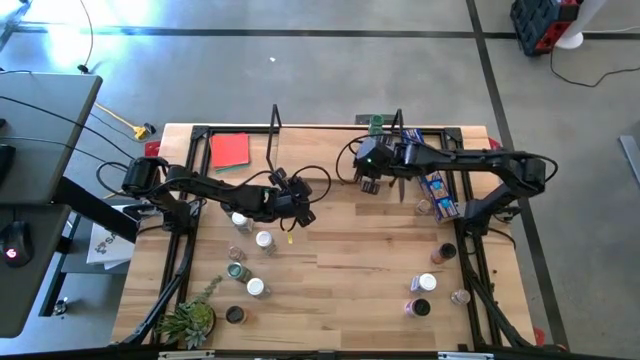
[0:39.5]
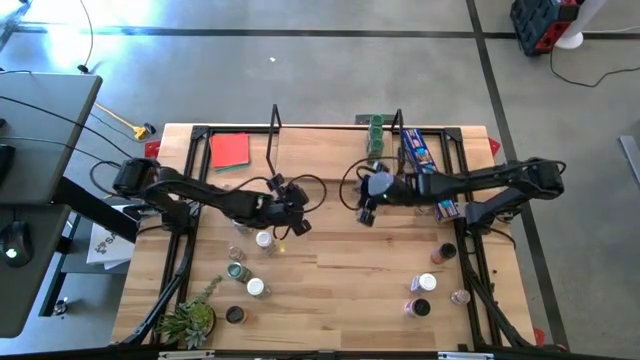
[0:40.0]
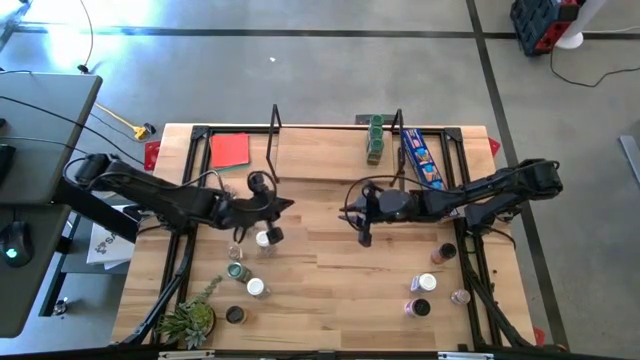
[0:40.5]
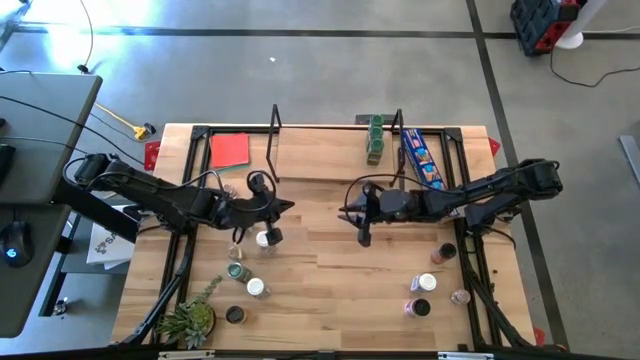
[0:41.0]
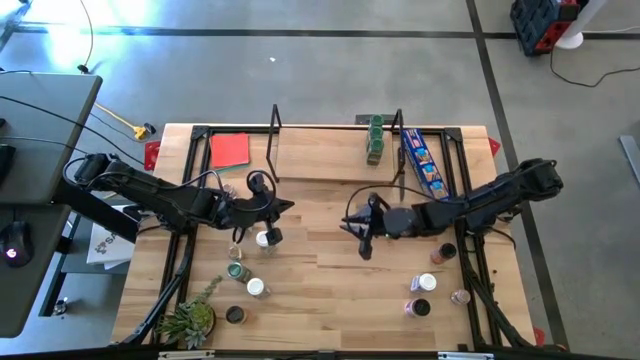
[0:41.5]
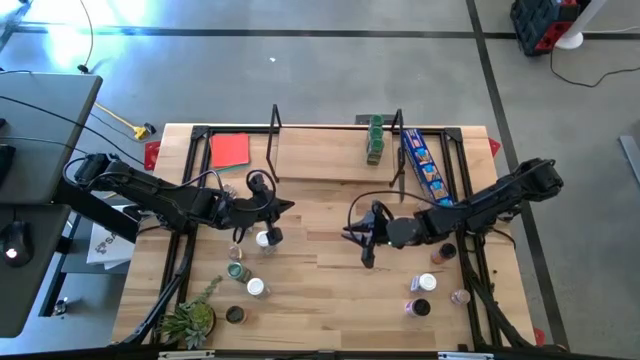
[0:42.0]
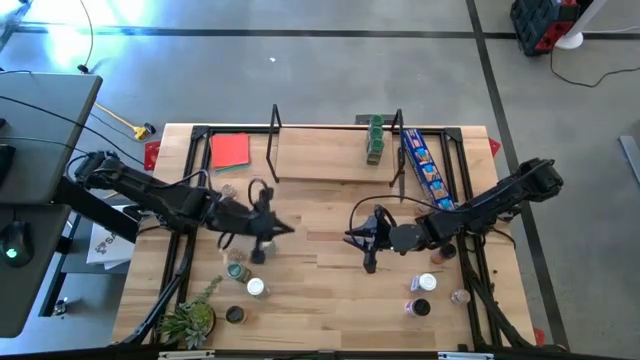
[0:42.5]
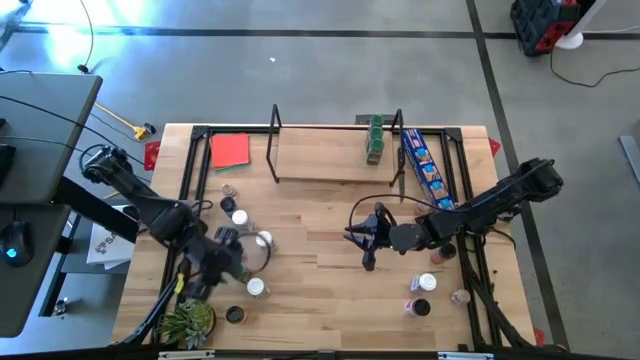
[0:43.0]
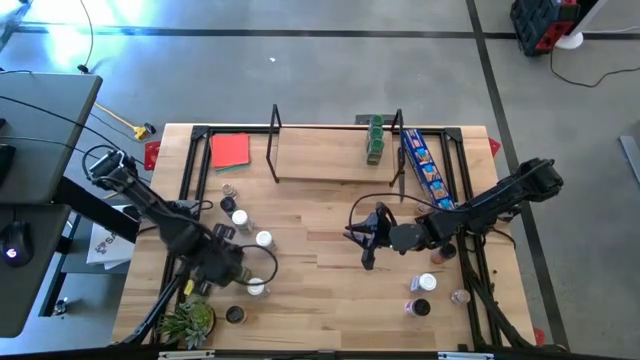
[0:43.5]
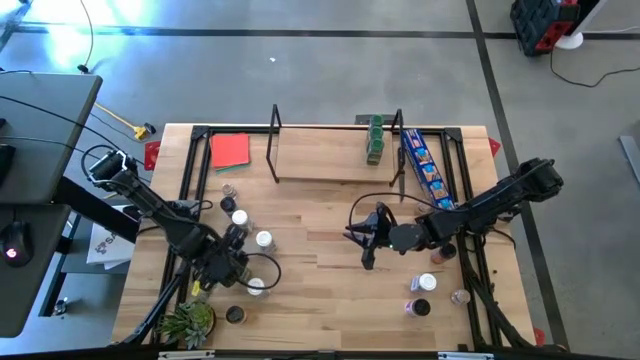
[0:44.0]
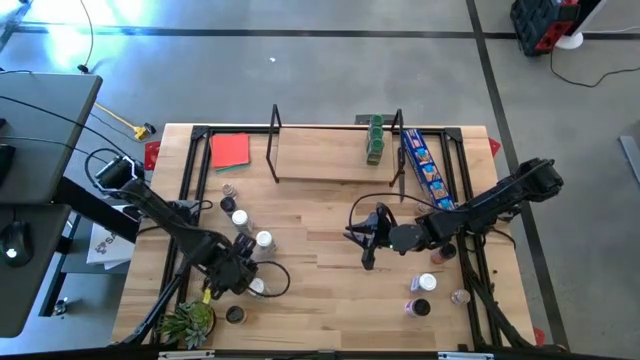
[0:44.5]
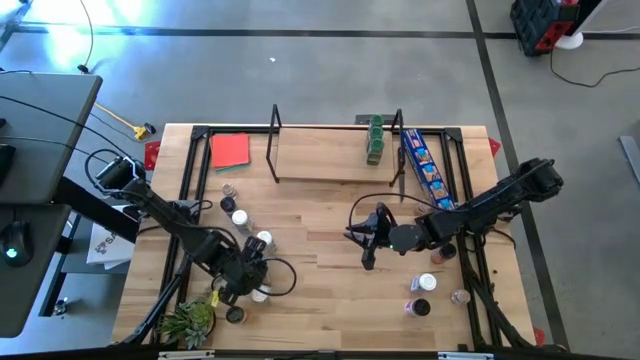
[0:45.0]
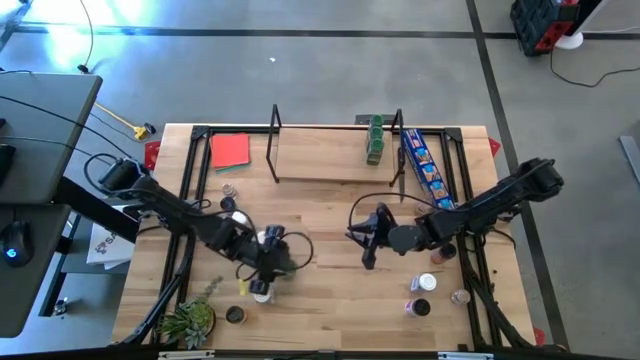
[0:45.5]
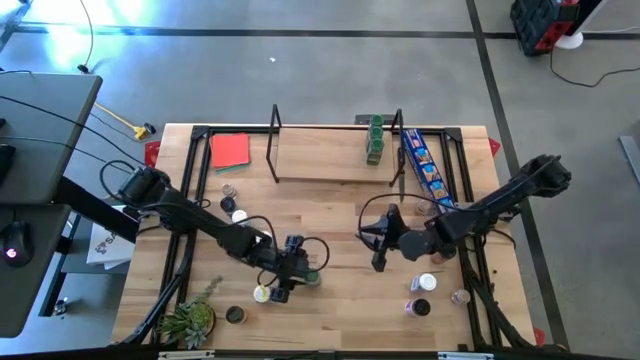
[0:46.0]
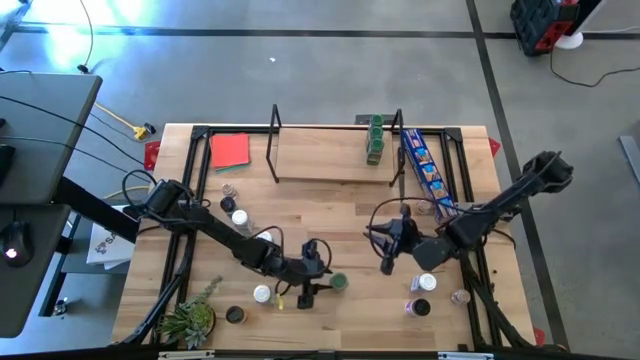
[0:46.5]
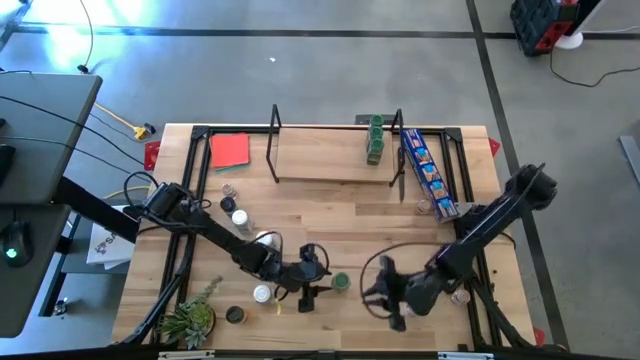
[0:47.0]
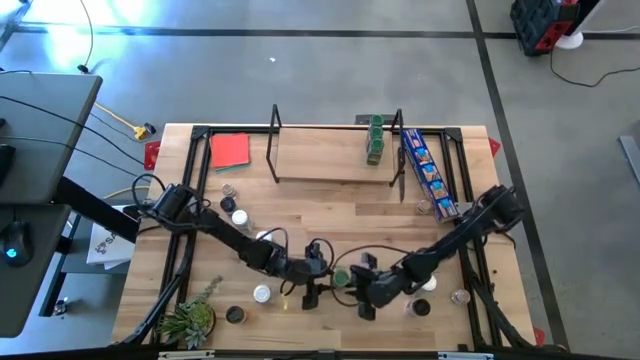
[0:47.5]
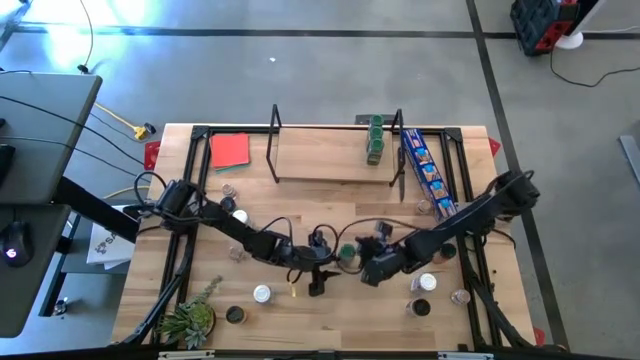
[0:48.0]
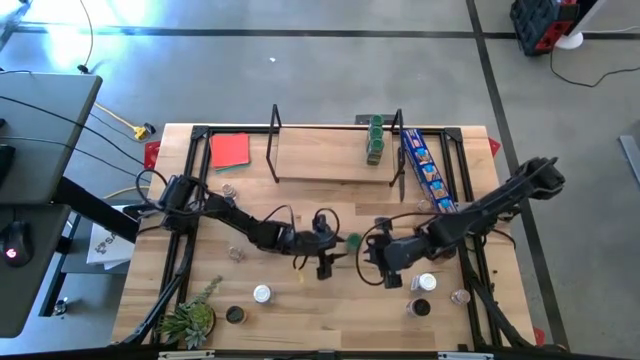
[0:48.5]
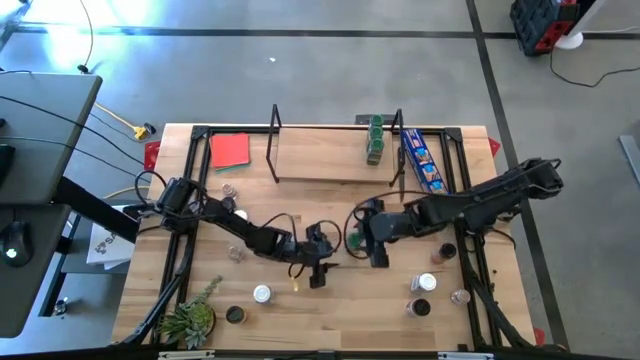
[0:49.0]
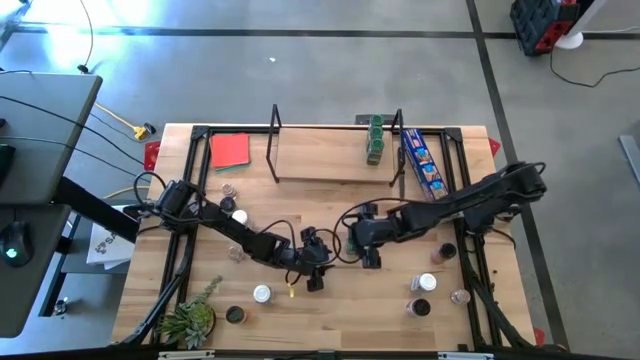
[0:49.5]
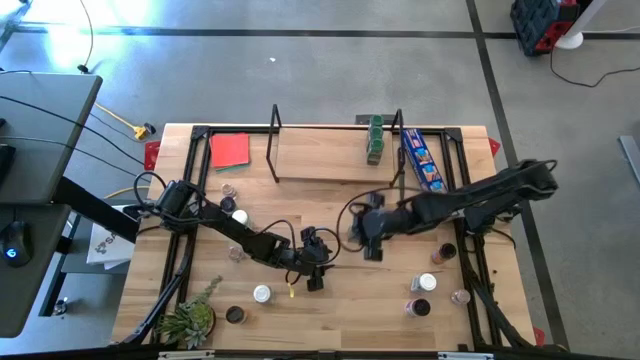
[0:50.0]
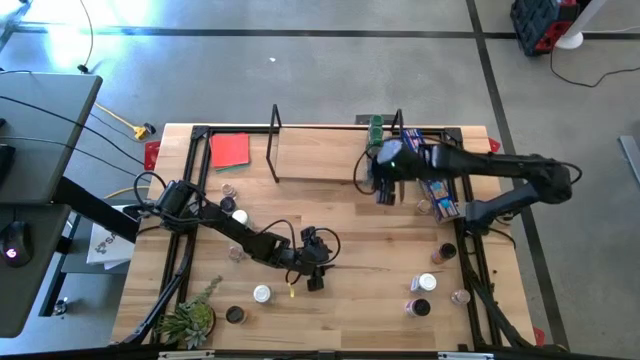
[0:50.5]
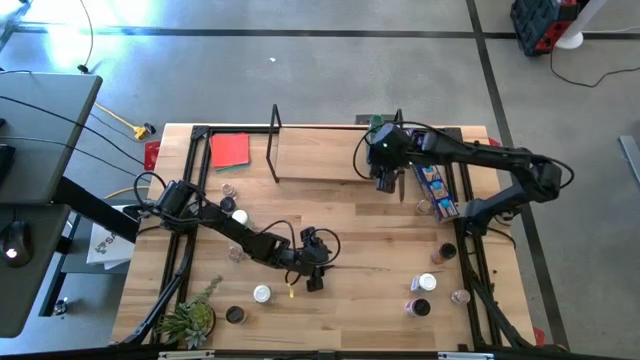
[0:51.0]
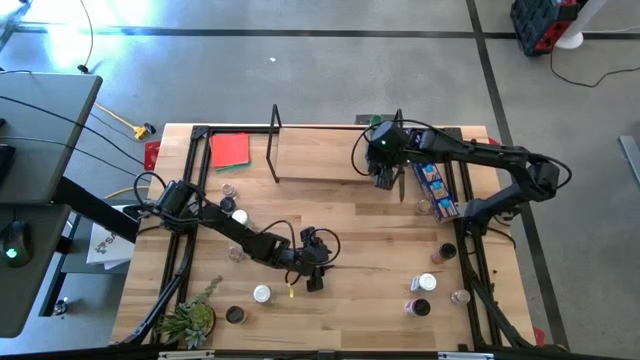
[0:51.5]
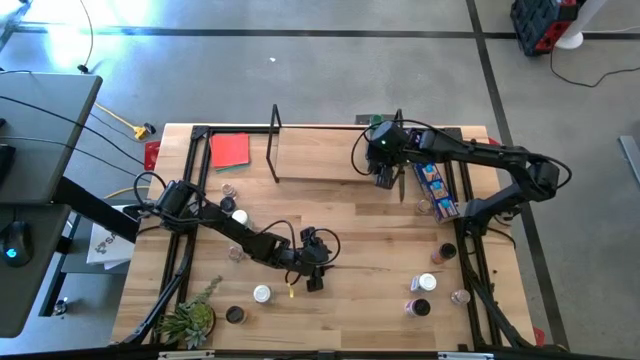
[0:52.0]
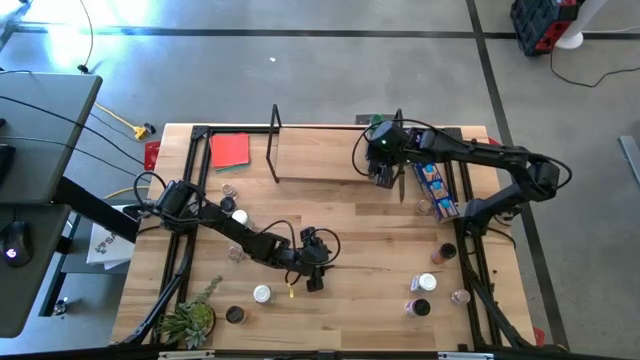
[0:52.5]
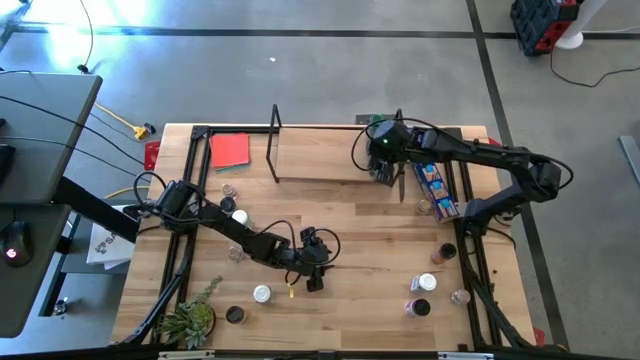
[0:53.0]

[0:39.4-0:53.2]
Task: Shelf spices
Put the green seasoning bottle on the shelf aligned with the other green seasoning bottle

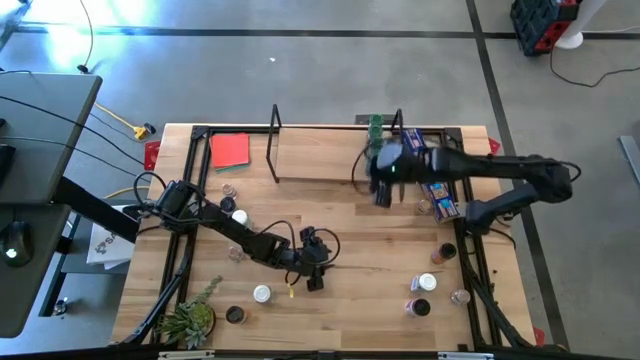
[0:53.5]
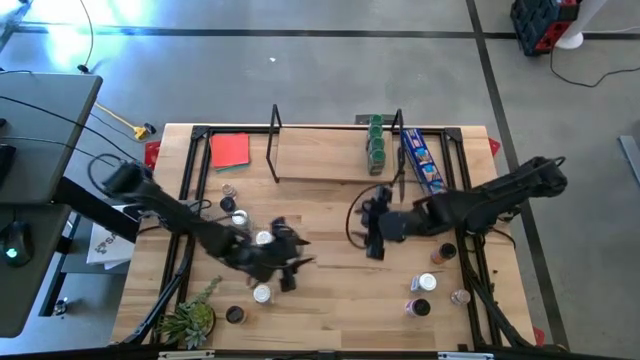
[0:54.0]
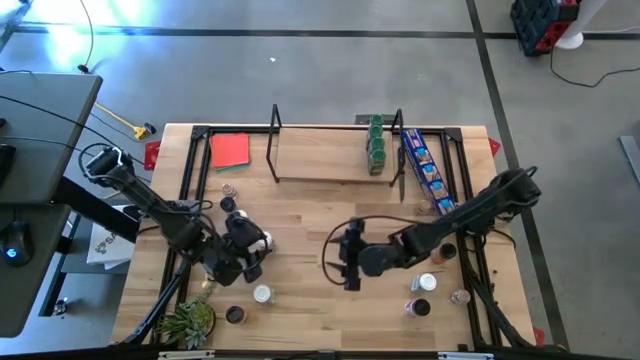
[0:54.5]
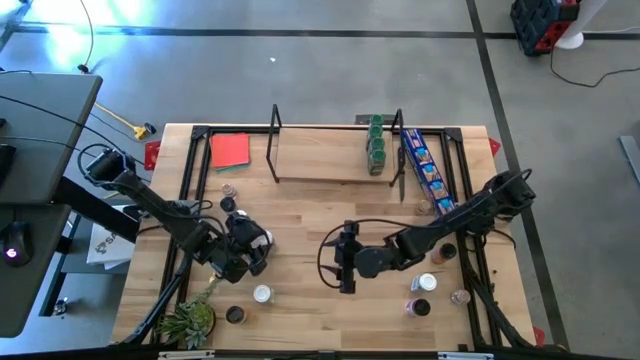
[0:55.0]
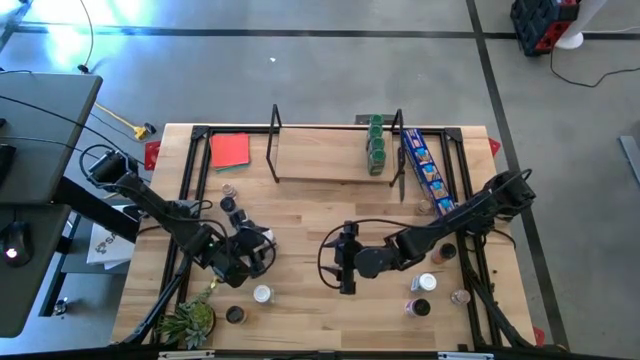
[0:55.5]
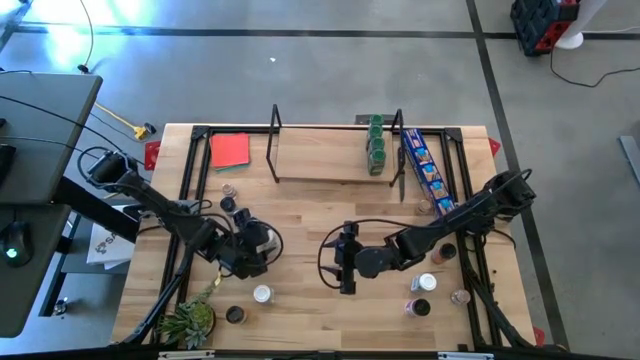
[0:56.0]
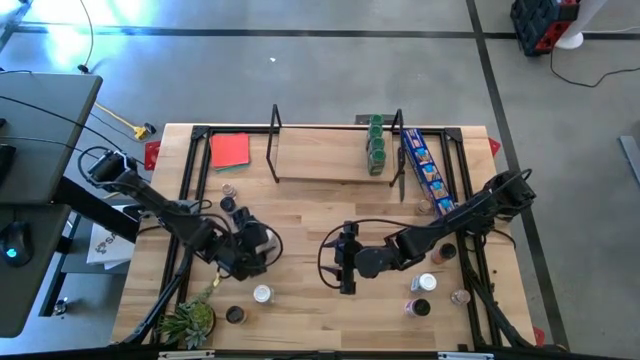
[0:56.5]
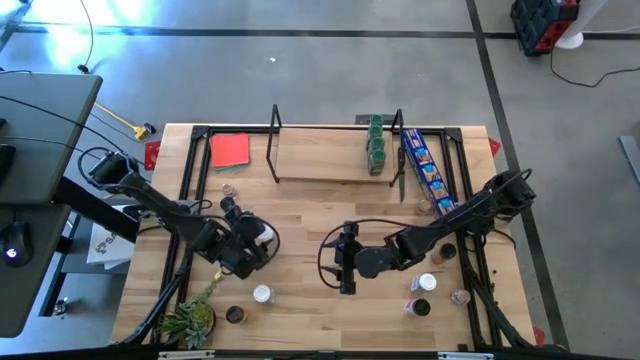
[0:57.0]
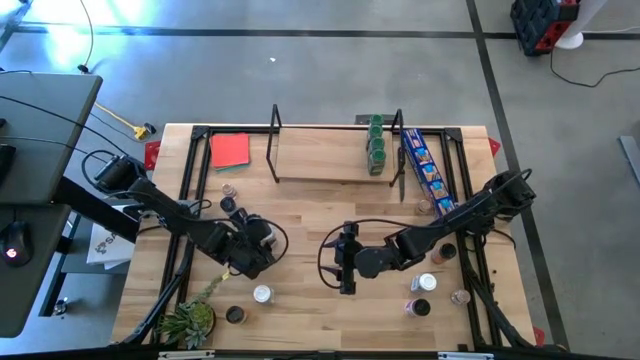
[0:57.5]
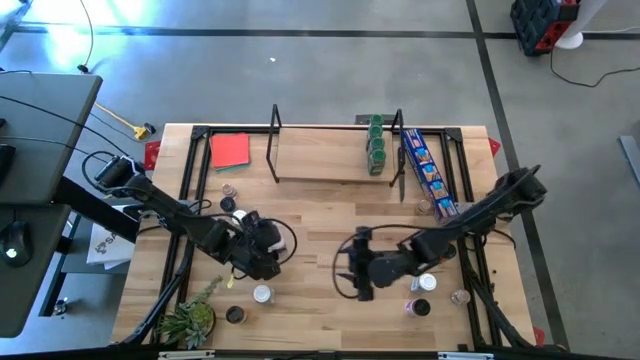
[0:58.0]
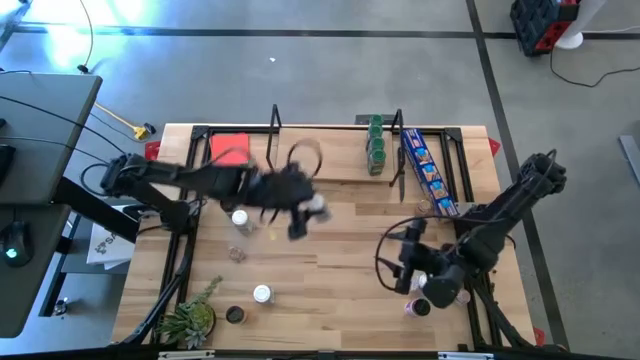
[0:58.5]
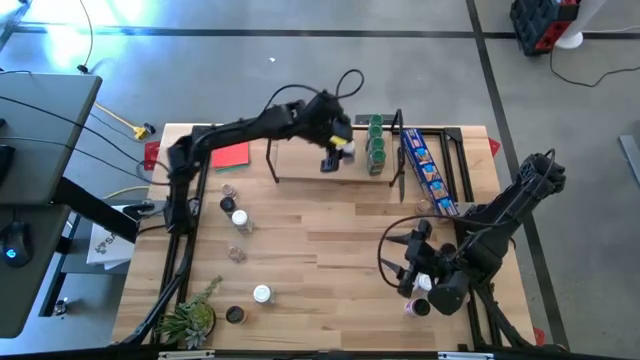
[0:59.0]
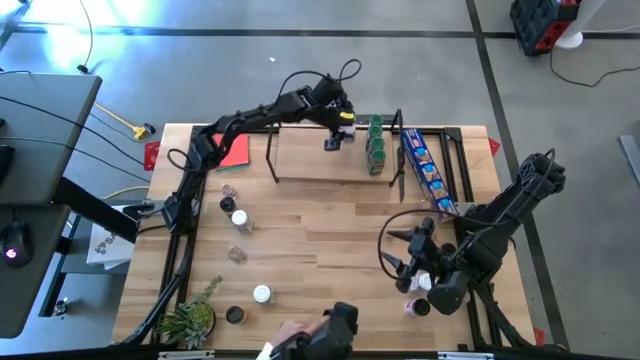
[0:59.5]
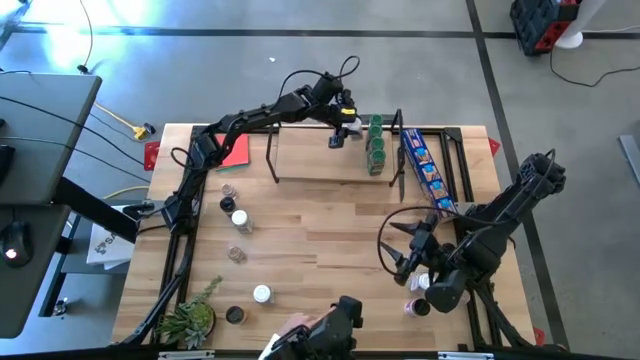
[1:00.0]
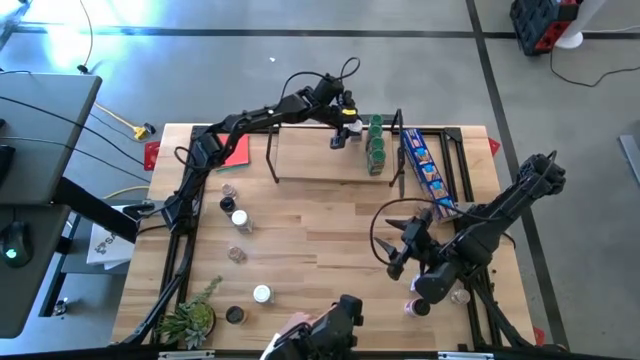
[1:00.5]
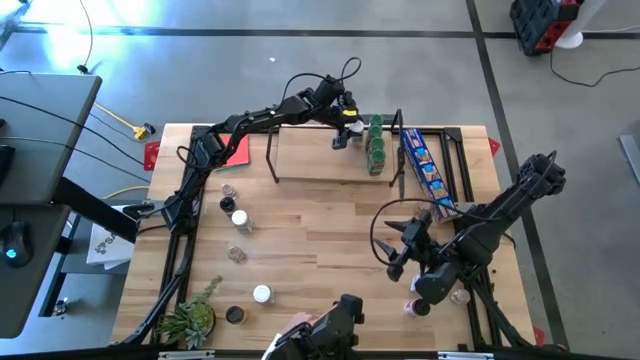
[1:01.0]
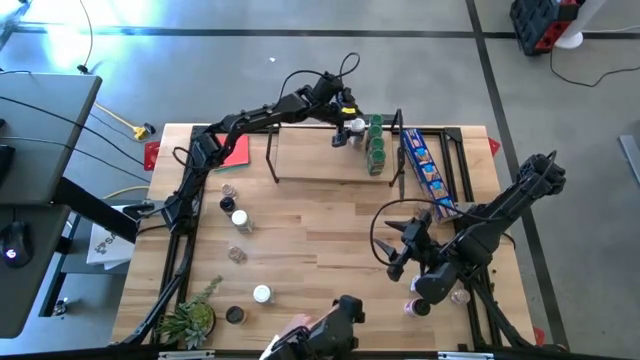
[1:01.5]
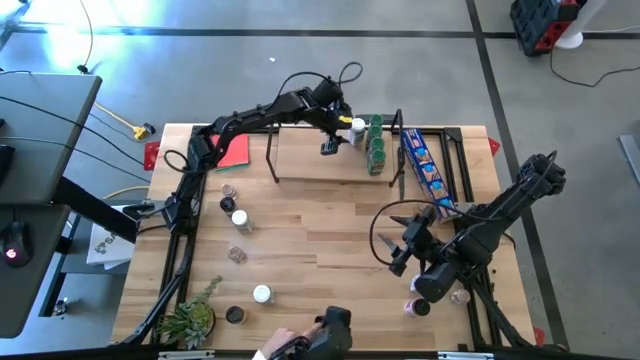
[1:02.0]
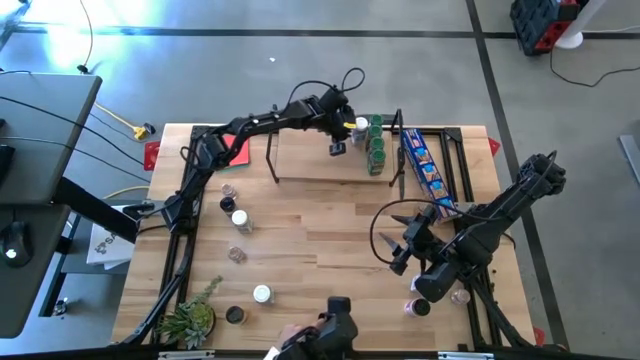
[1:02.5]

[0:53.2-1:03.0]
Put the middle left white seasoning bottle on the shelf
